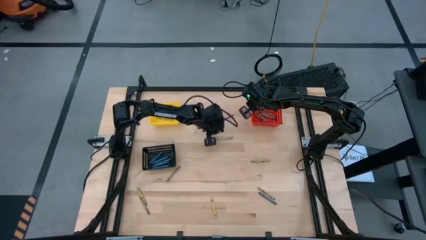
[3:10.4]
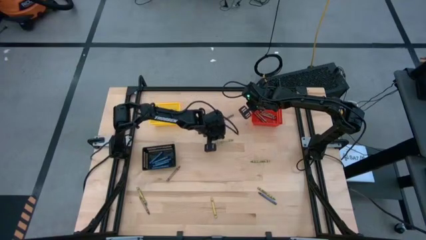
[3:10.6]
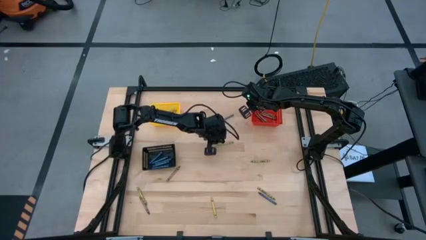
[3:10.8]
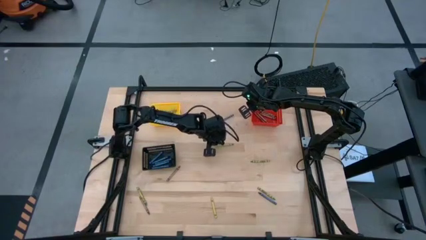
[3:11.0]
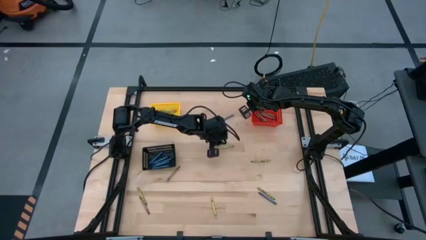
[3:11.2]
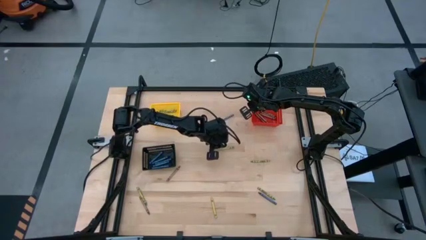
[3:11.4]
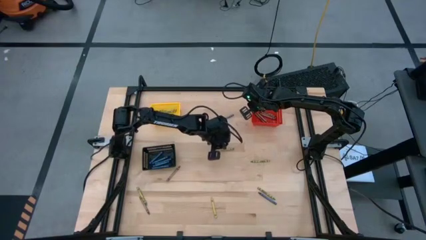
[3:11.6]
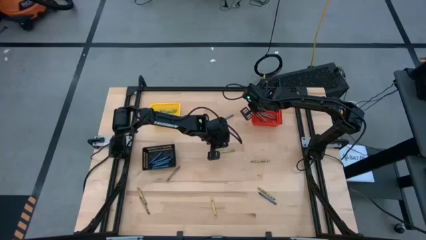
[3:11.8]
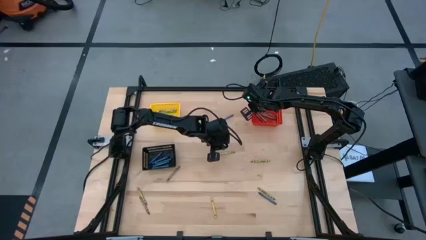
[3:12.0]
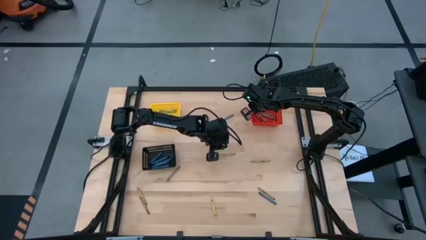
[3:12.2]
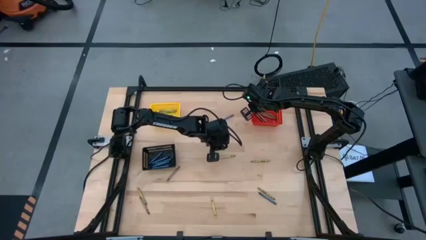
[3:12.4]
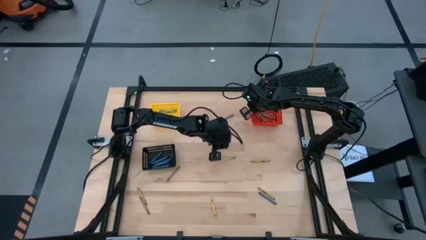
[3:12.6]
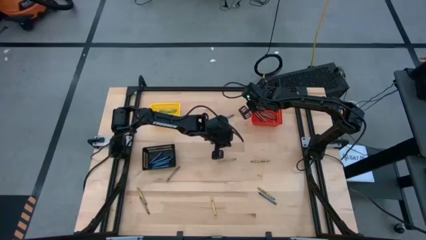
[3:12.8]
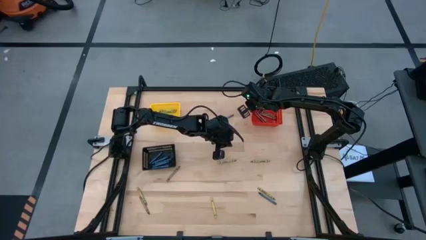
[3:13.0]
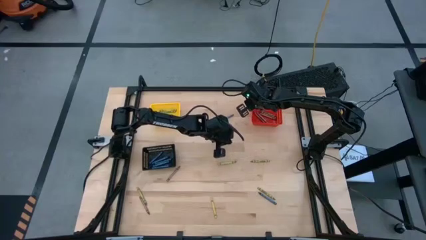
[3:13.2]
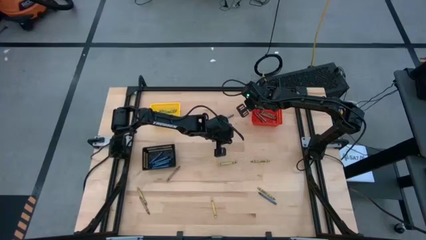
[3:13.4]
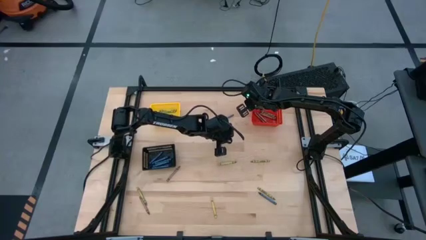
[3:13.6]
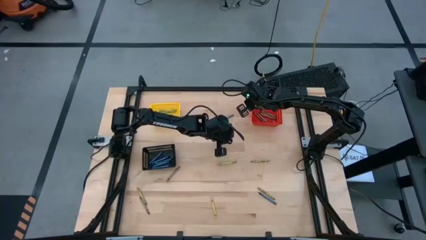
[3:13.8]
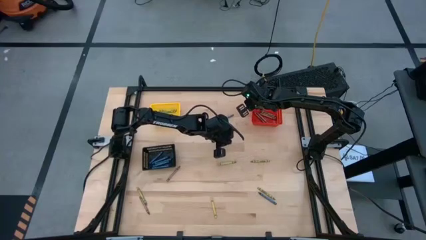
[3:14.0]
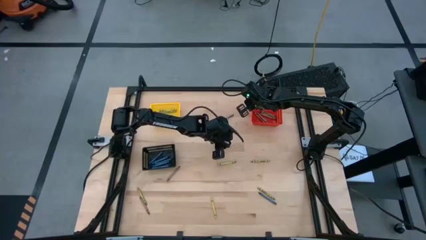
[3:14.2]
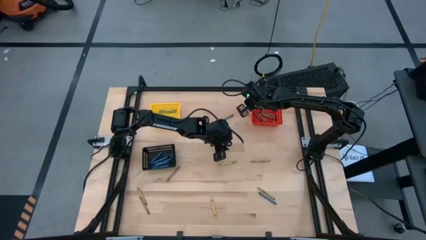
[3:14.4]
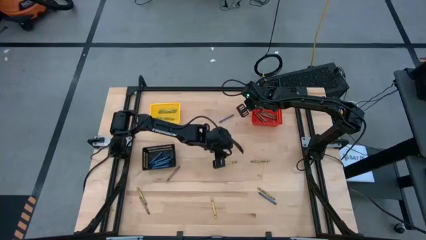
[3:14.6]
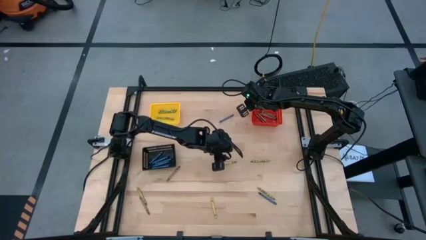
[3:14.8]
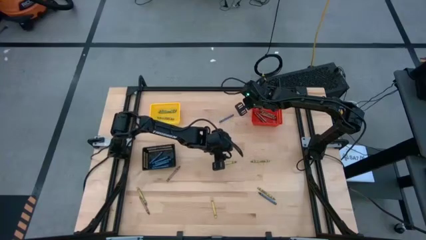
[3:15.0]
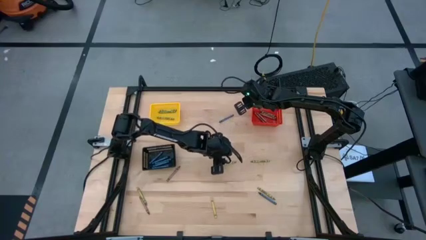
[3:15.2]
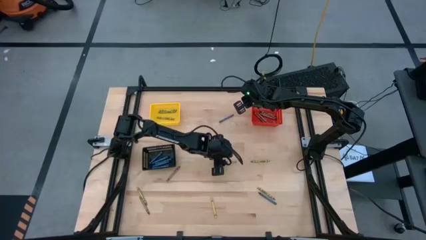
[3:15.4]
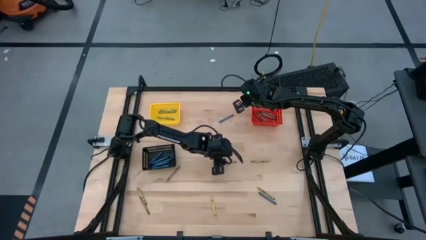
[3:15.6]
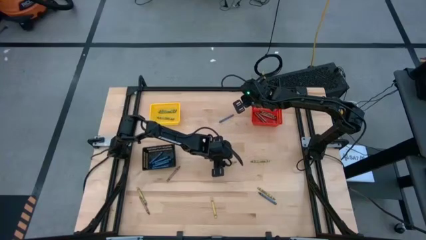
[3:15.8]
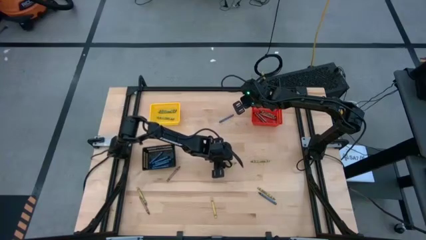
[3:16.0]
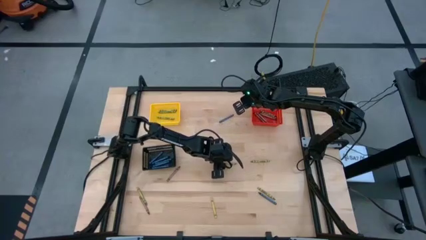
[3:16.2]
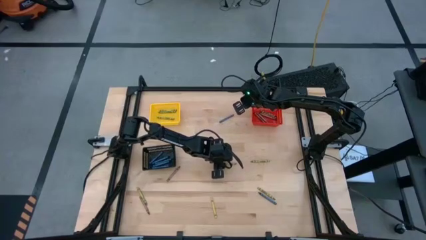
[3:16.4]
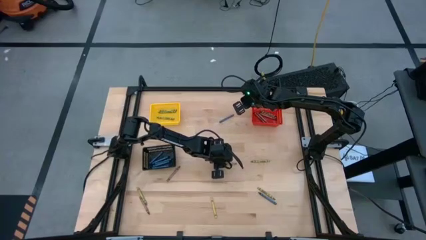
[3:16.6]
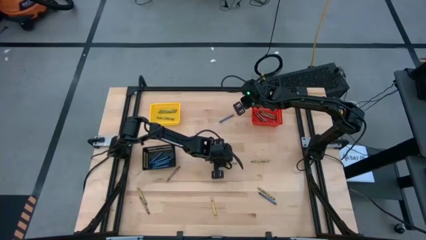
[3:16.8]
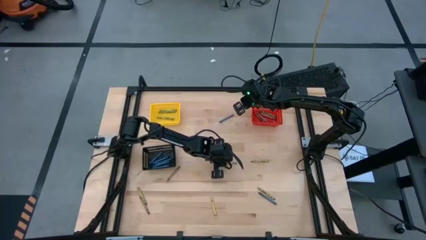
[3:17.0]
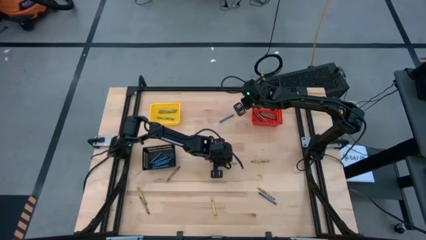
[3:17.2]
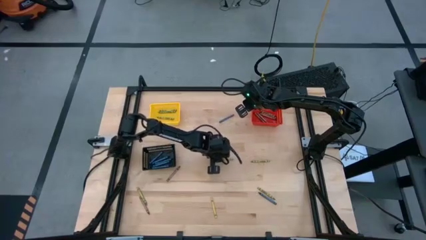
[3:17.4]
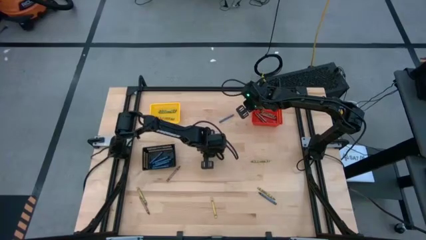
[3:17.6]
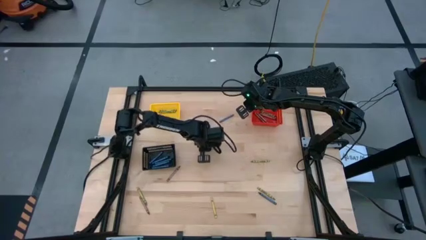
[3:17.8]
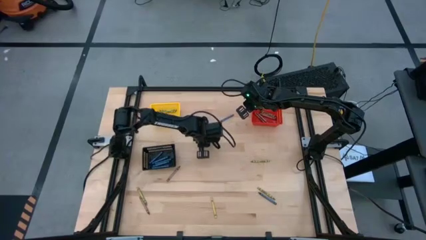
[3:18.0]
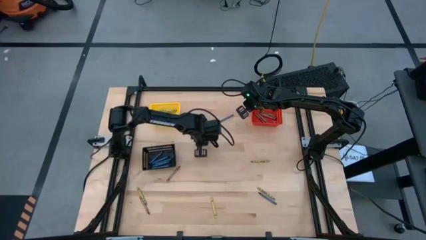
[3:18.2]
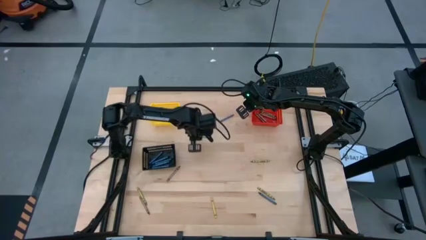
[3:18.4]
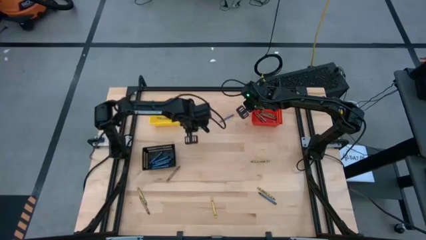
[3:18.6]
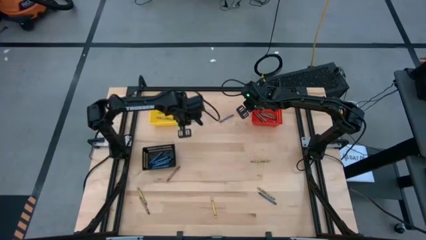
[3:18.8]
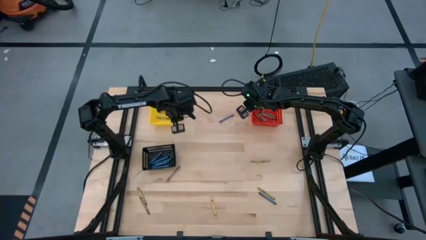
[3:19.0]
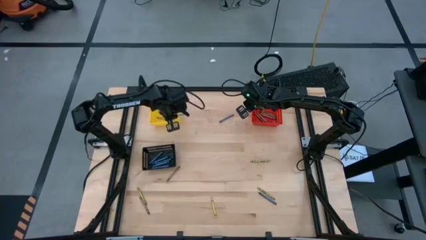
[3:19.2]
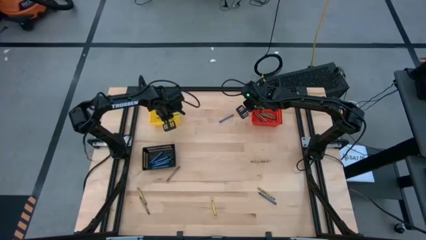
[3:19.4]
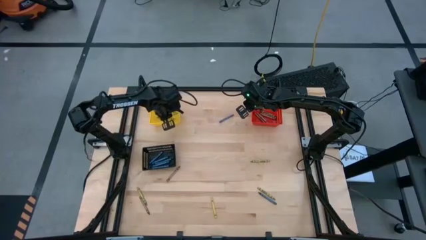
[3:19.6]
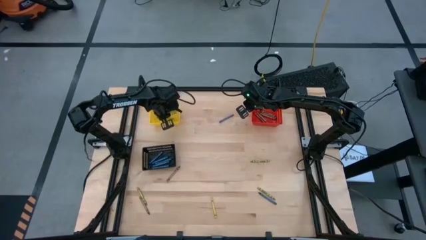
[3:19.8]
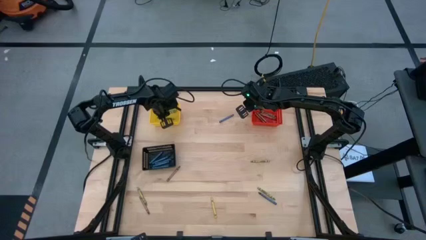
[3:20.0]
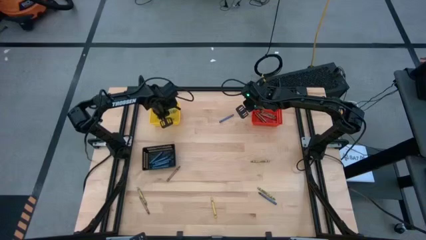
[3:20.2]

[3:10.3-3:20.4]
Task: Sort crayons
Put the green crayon into the yellow bin

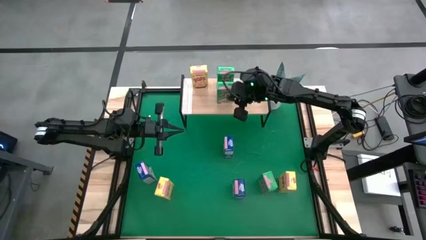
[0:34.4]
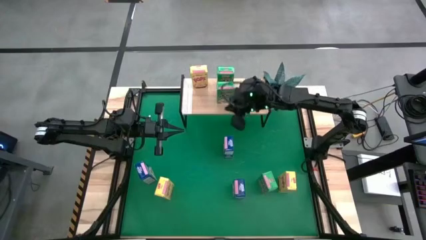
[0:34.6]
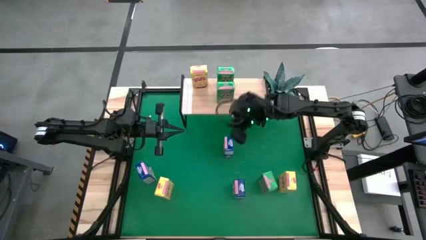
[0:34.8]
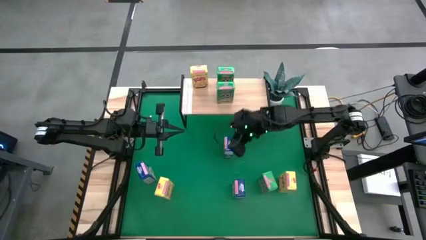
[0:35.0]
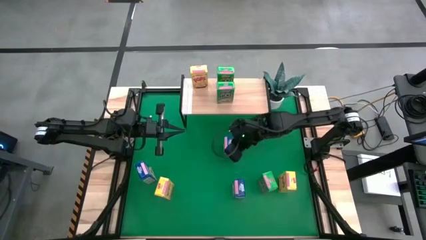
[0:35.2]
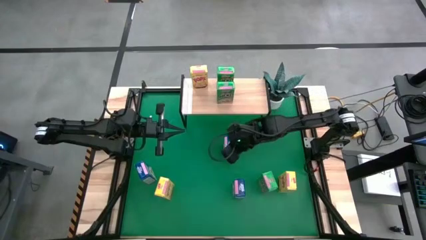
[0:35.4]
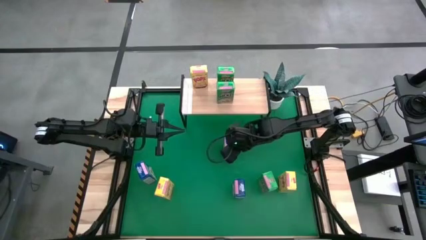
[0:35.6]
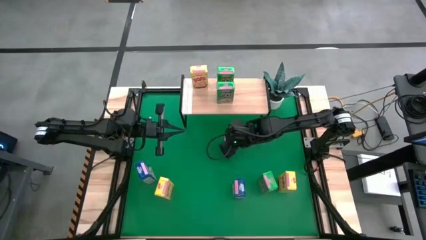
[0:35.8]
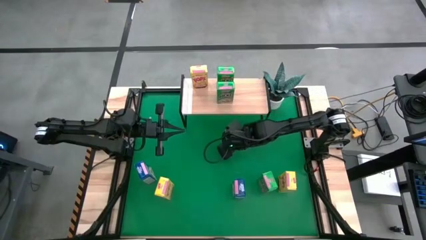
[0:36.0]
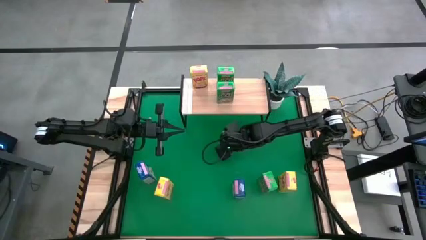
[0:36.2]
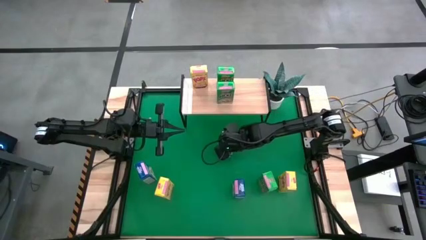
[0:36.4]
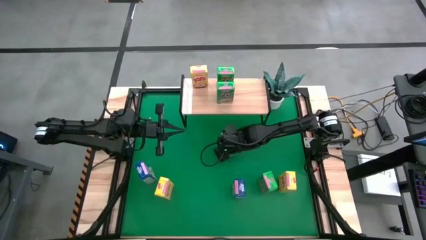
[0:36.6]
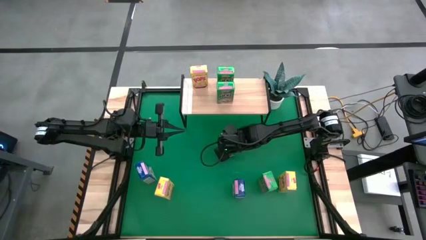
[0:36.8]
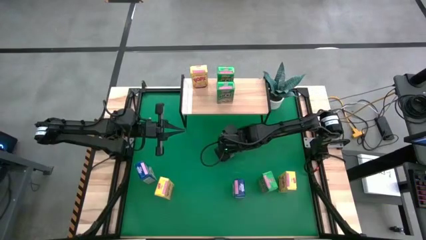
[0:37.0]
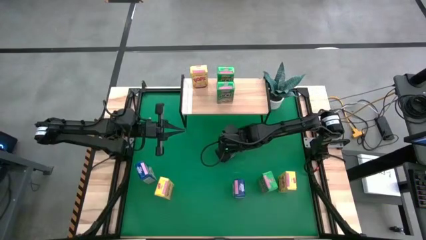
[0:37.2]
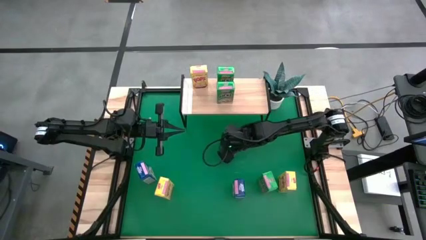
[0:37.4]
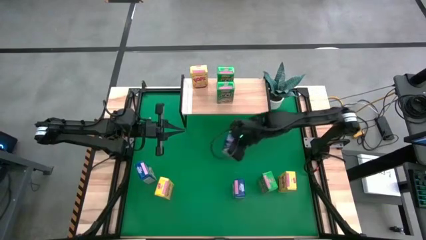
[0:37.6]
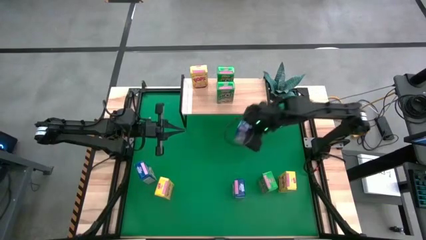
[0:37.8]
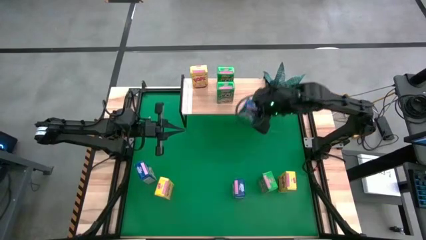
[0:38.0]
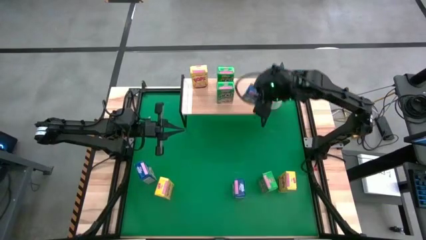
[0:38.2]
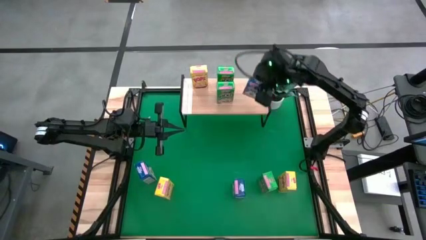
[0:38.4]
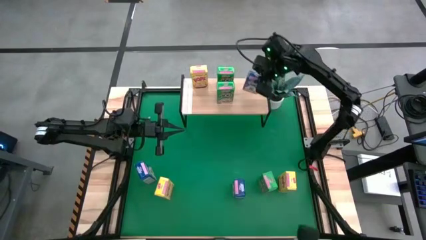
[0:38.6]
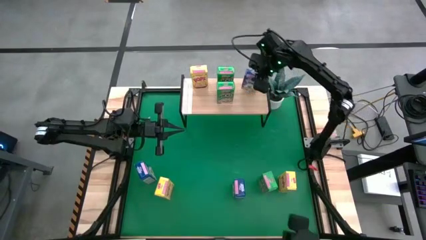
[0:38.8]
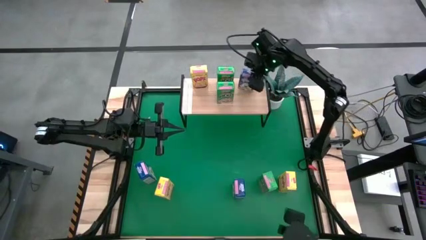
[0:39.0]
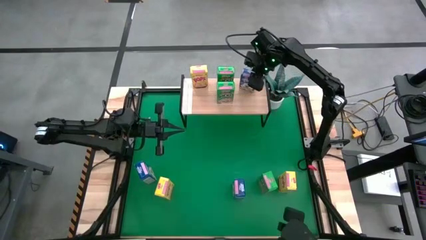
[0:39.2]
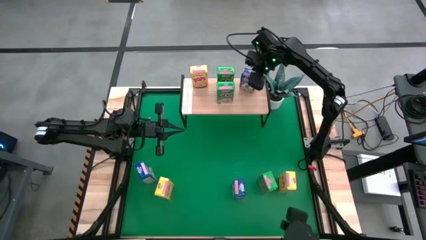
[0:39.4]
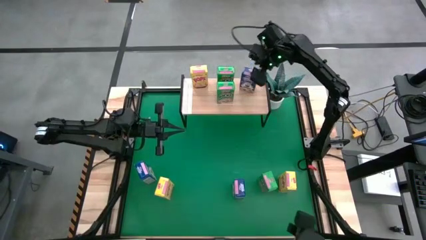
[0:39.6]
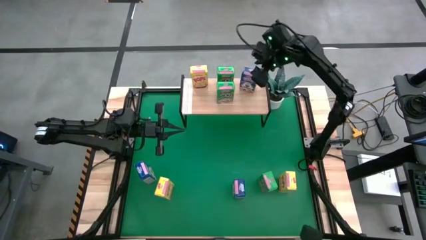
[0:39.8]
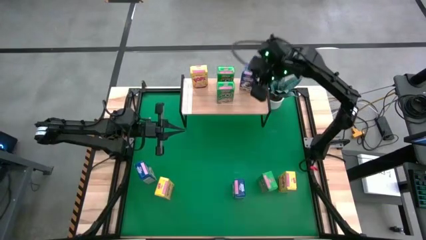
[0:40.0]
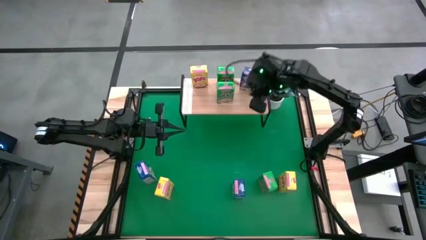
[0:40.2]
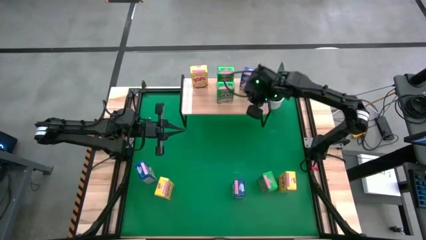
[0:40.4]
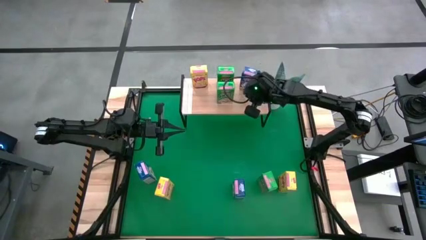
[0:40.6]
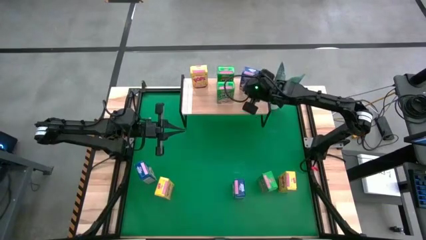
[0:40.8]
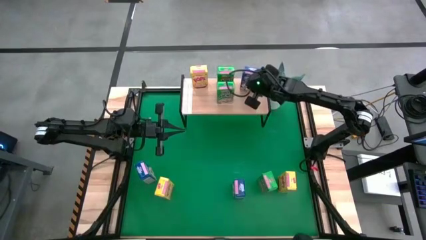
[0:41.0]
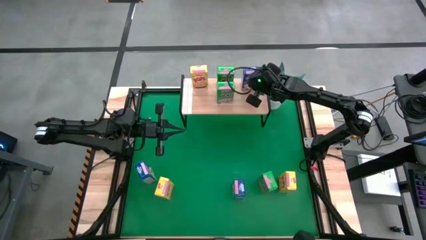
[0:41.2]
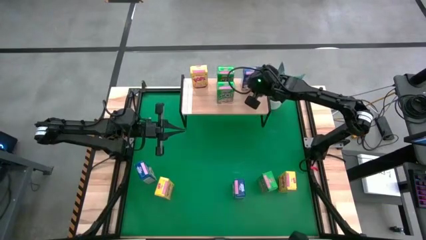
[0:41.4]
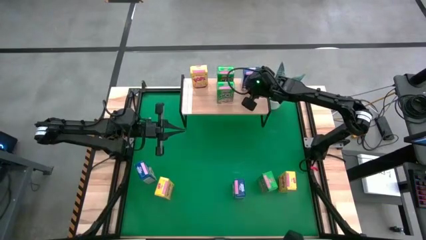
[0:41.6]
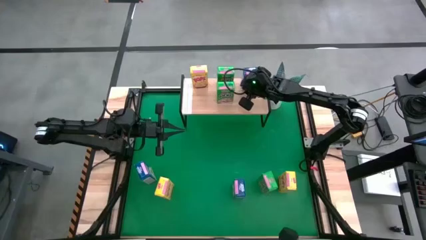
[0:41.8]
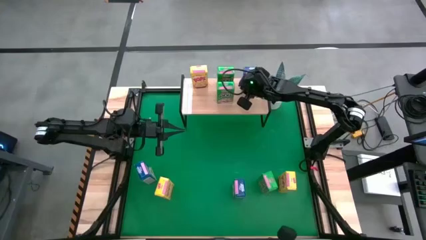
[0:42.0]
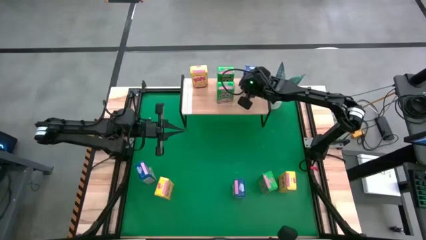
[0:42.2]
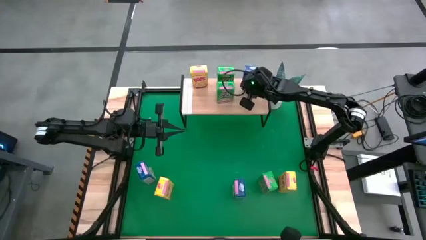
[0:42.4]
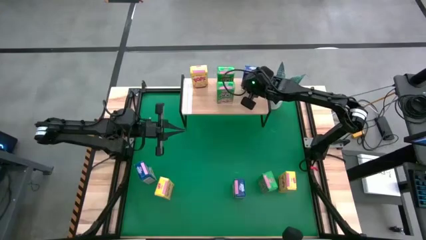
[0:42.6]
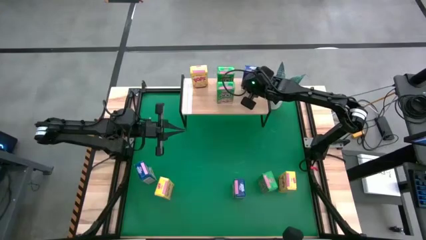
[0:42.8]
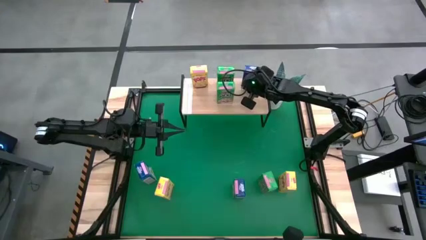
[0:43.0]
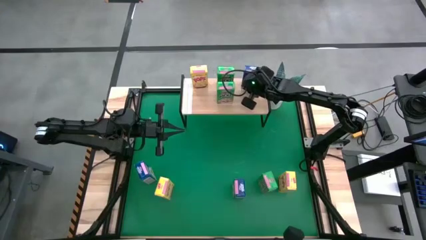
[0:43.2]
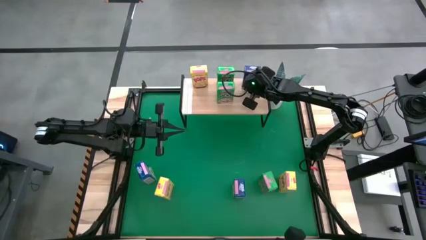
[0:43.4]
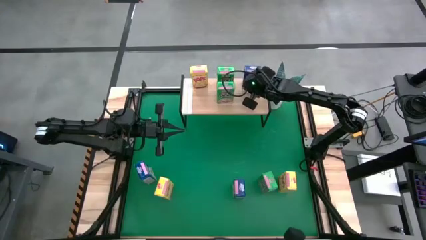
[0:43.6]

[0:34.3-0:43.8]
Task: Stack cereal on shelf
Put the top blue cereal box on the shelf
